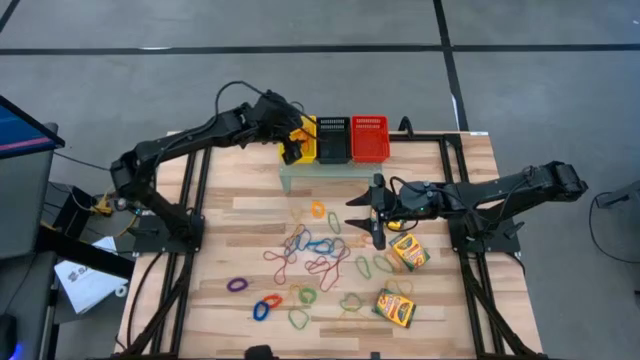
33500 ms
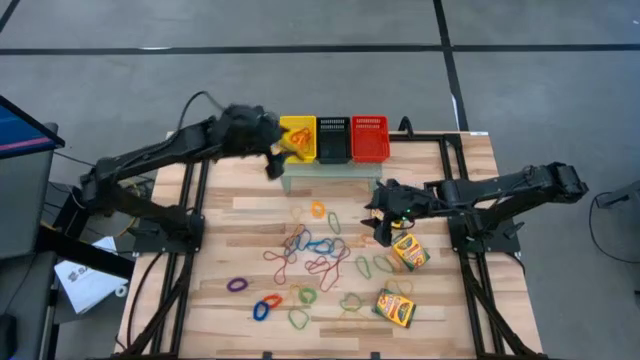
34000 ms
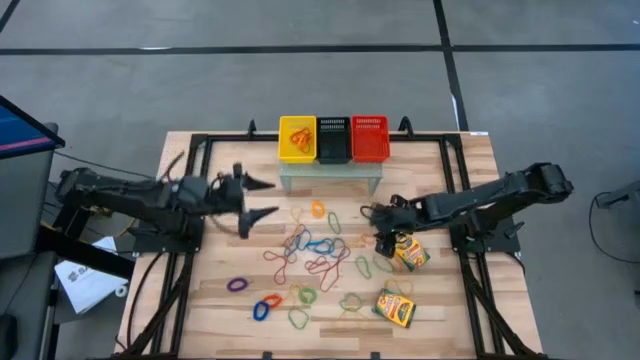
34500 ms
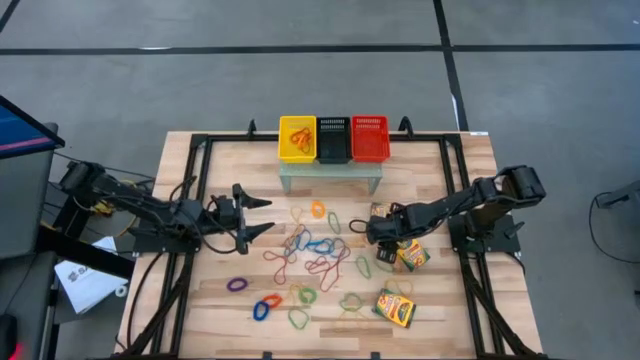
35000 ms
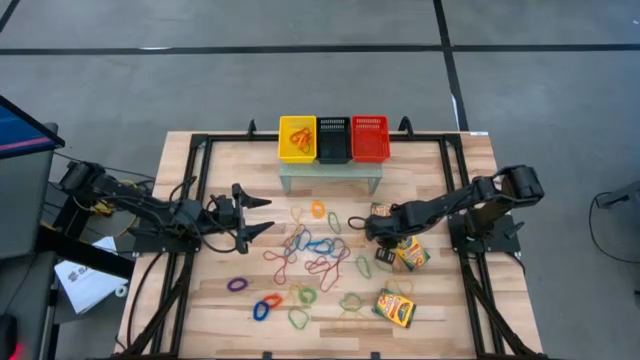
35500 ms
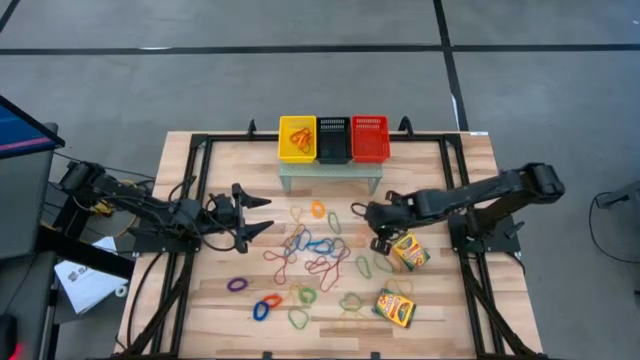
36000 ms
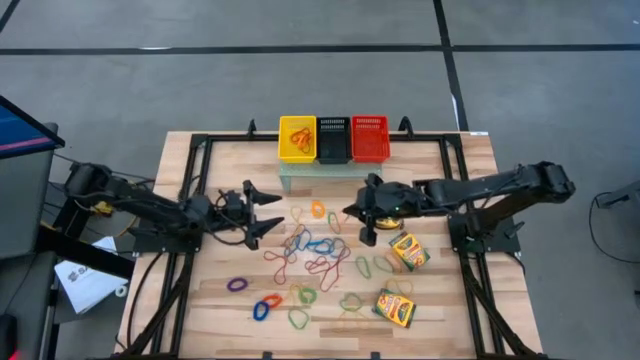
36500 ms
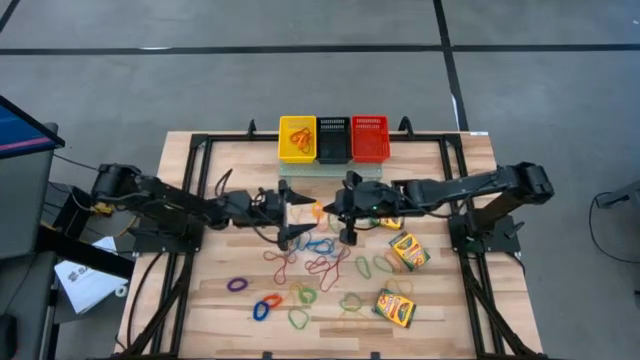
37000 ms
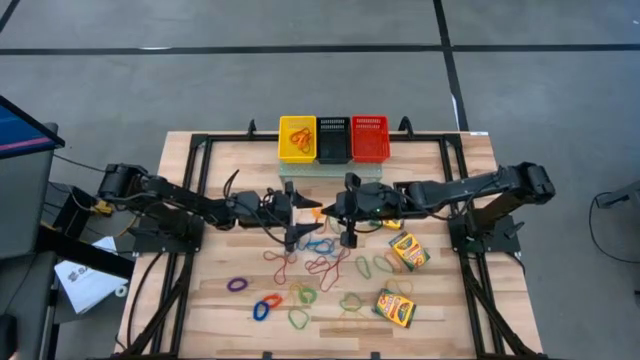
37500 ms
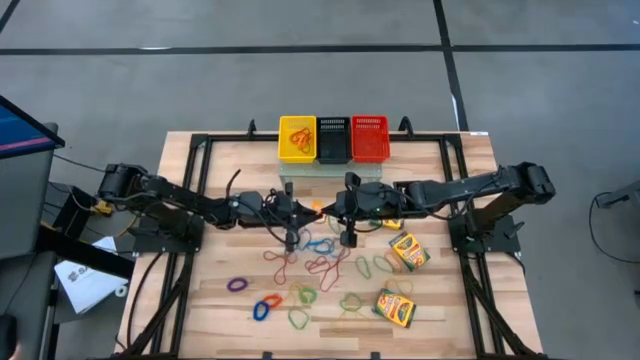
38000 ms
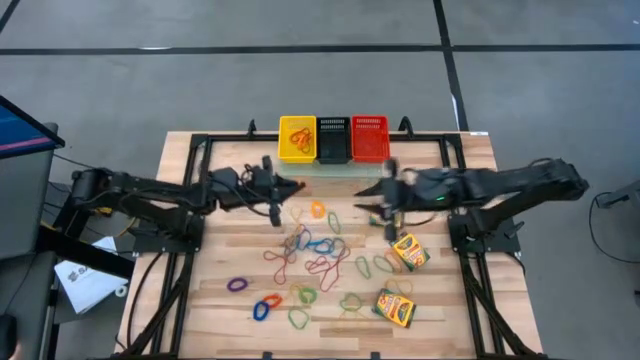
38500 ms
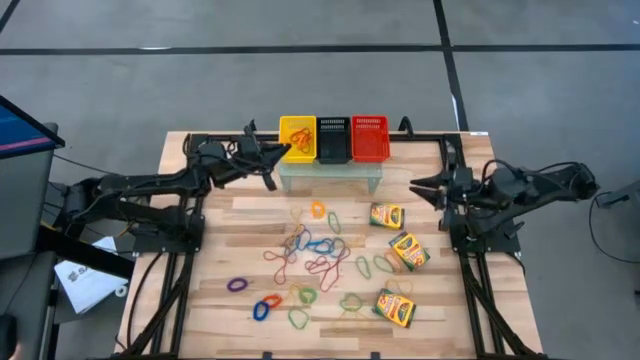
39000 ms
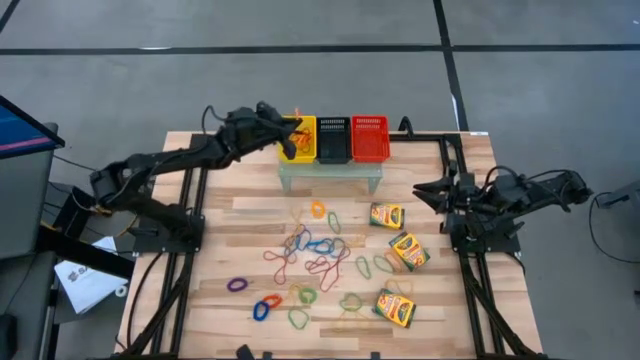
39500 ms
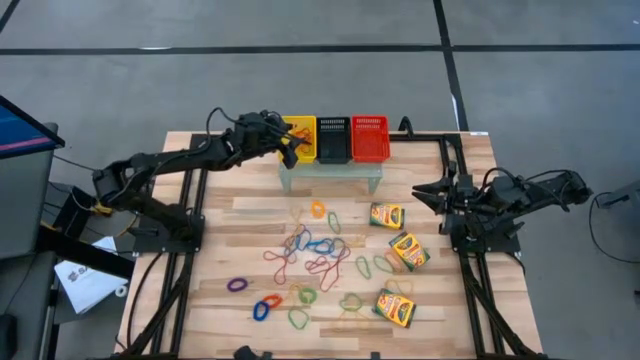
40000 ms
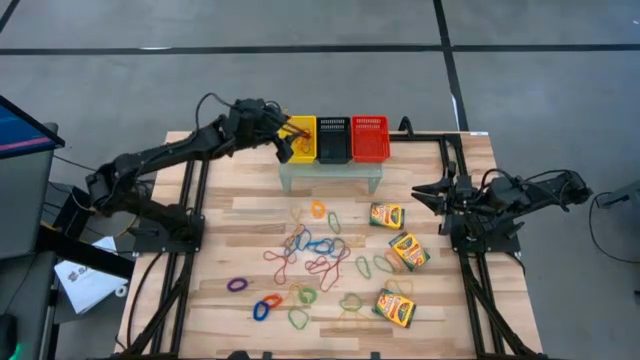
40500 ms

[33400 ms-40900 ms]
Task: Pick & Place Office Desk Supplies
Put the top small orange rubber band into the yellow bin on the shelf

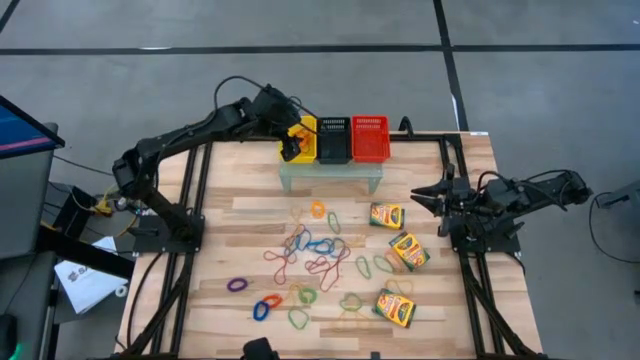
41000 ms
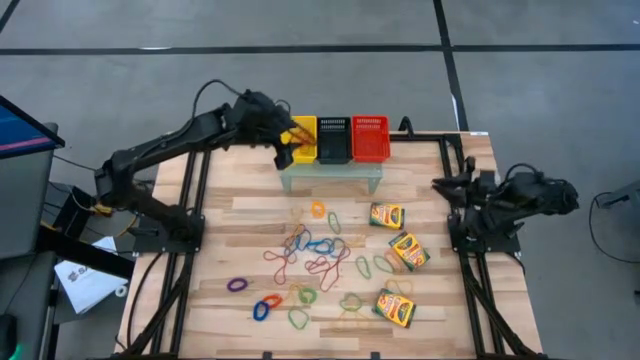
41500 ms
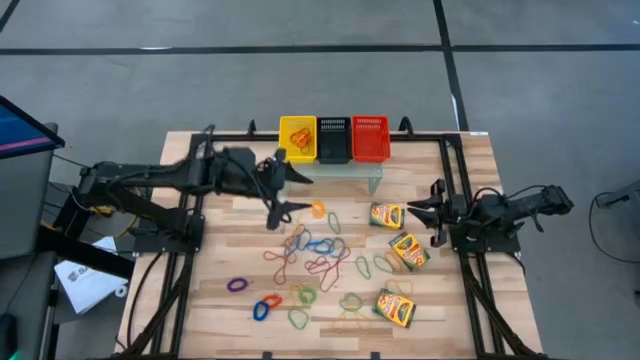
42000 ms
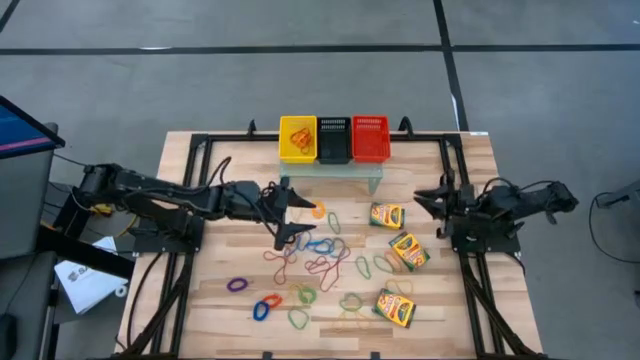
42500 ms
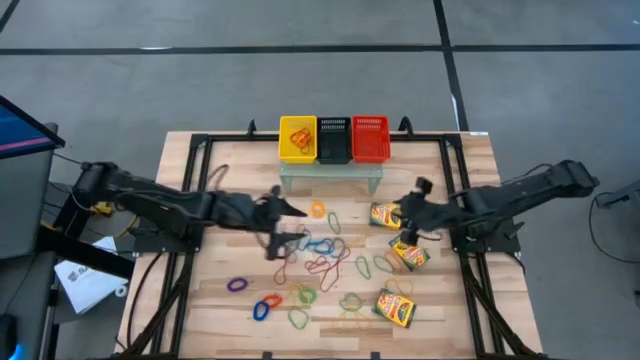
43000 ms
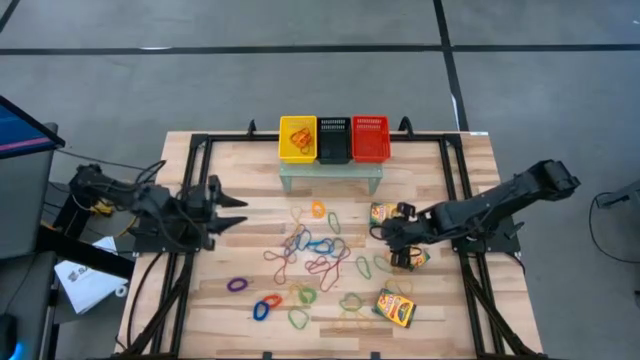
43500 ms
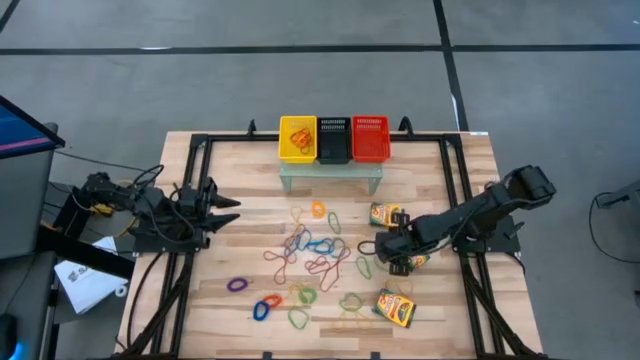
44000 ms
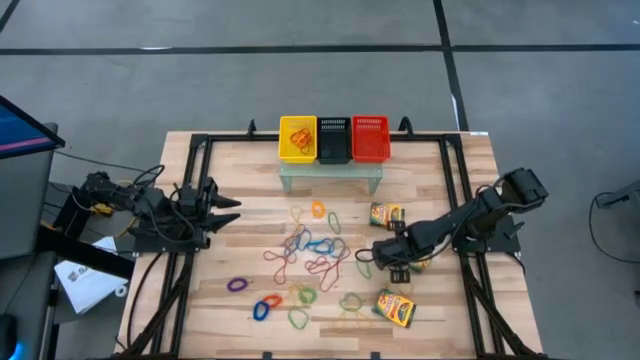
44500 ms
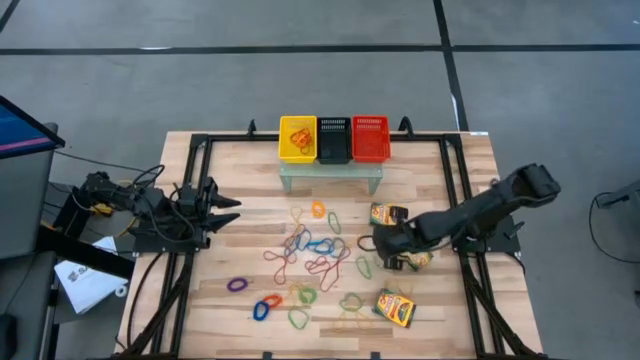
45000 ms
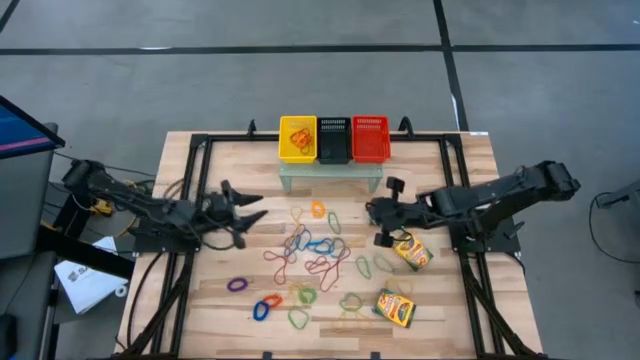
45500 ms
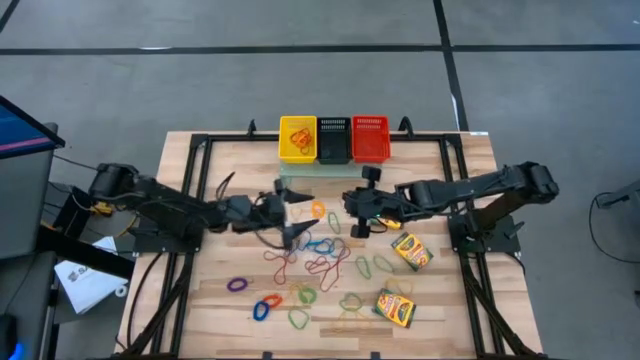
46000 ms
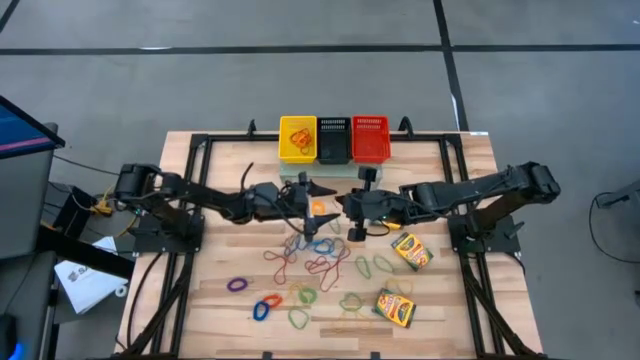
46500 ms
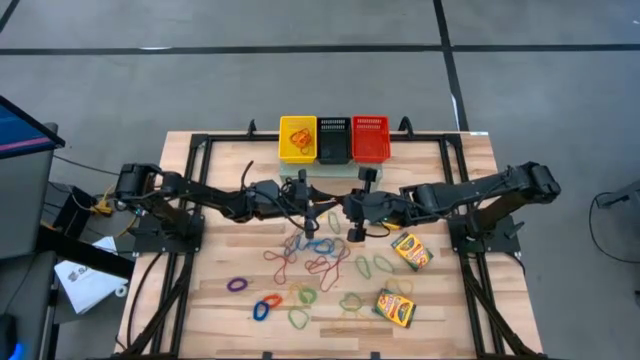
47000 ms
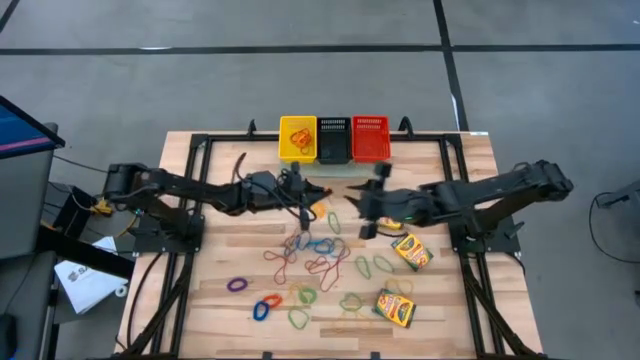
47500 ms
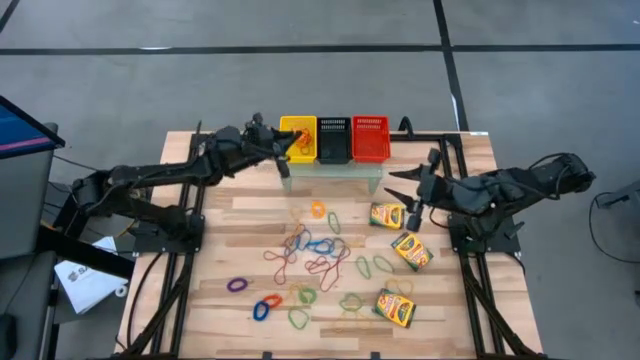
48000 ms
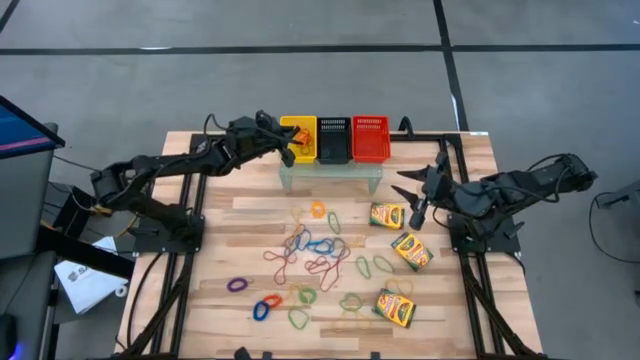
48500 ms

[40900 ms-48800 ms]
Put the small orange rubber band into the yellow bin on the shelf

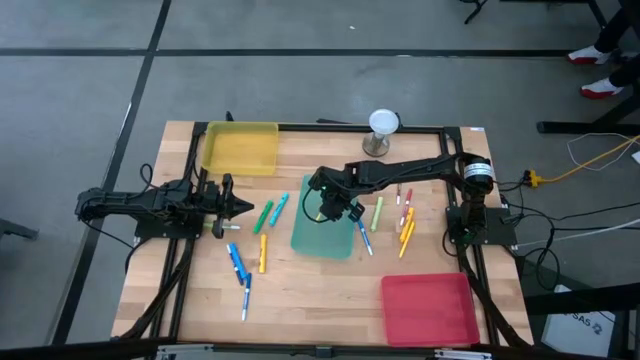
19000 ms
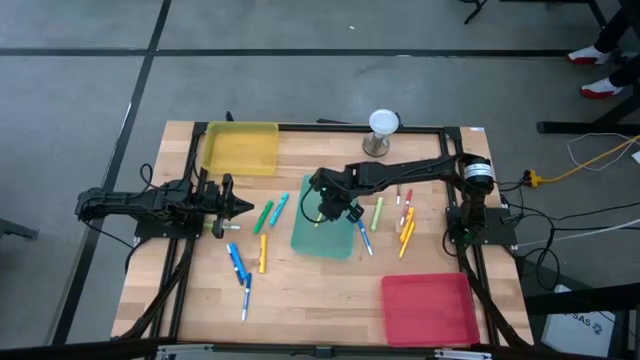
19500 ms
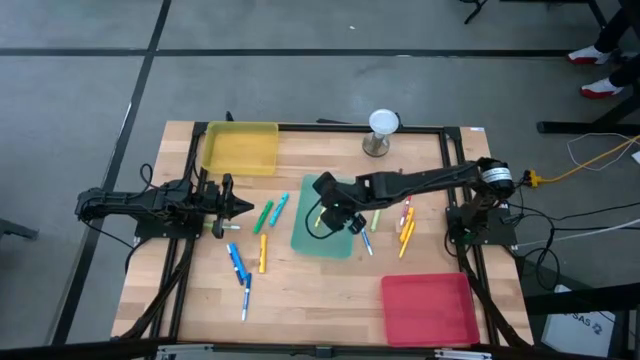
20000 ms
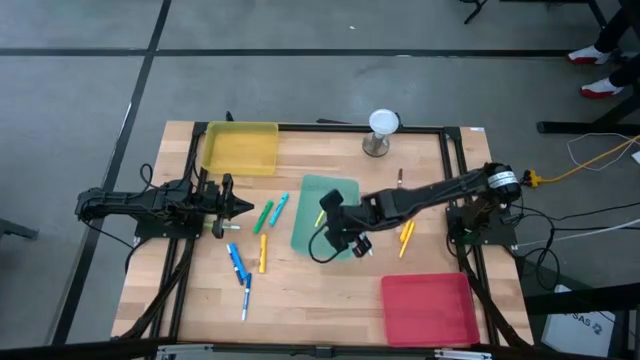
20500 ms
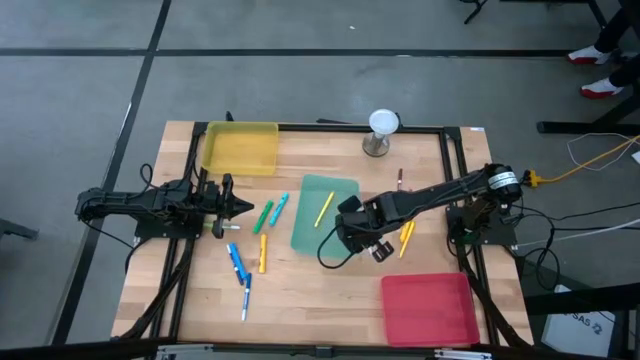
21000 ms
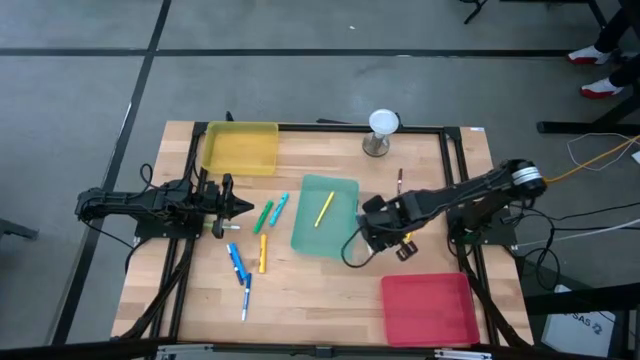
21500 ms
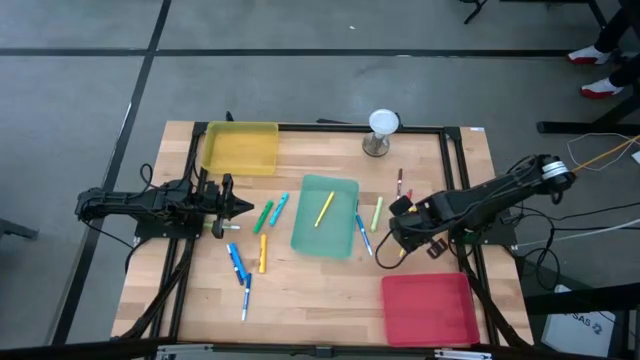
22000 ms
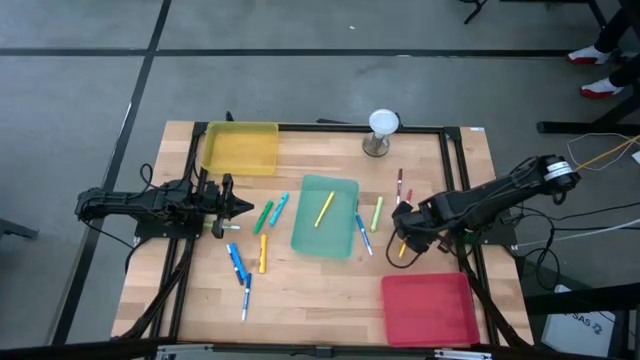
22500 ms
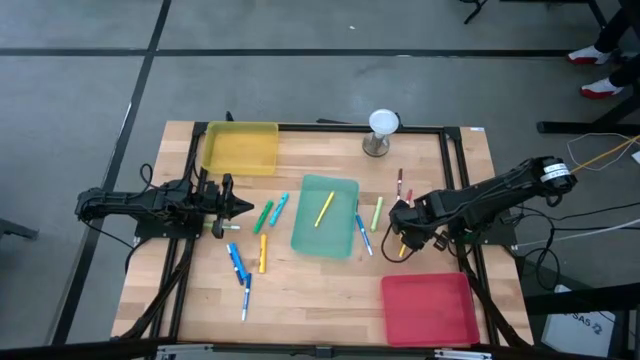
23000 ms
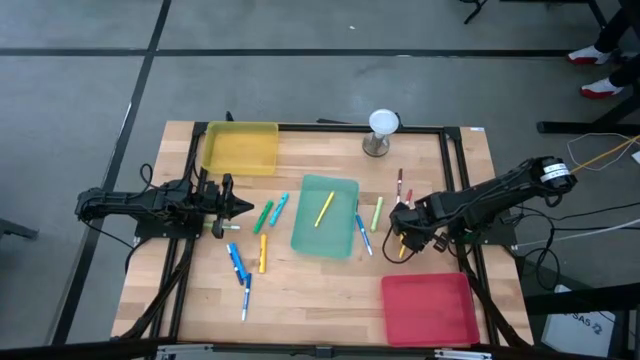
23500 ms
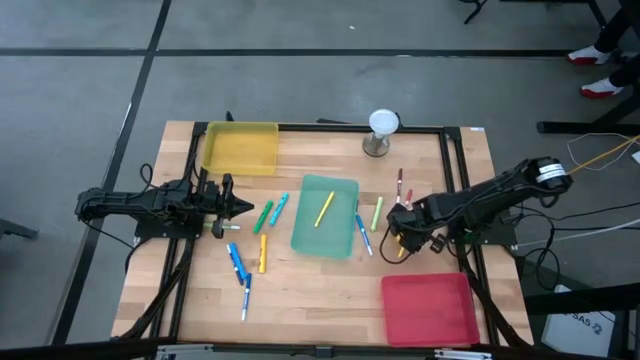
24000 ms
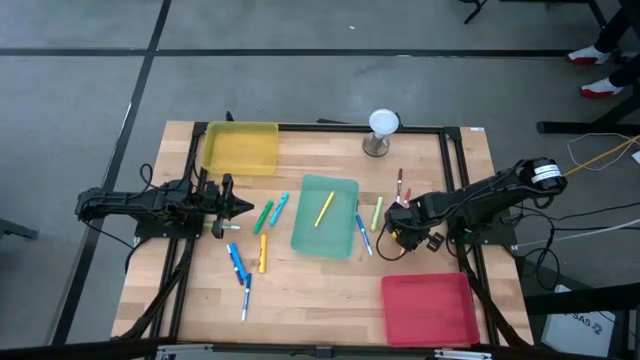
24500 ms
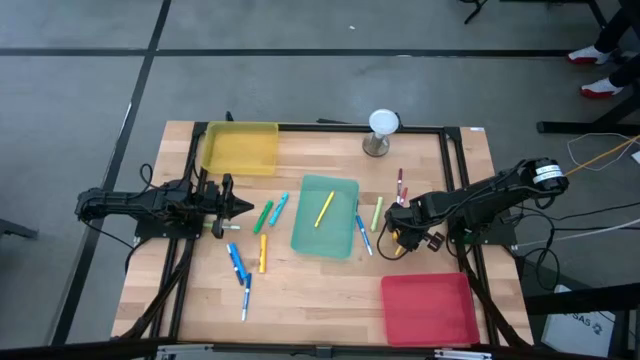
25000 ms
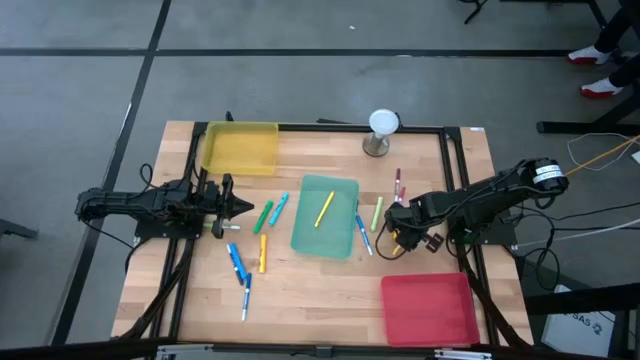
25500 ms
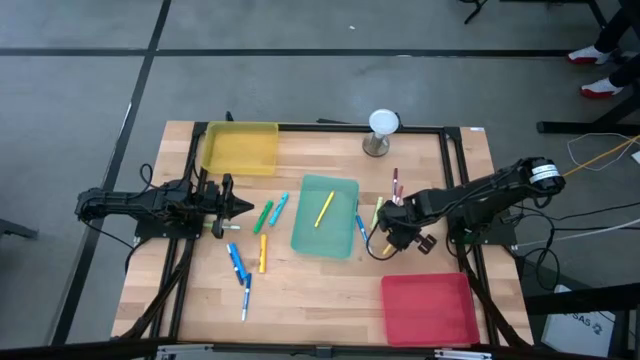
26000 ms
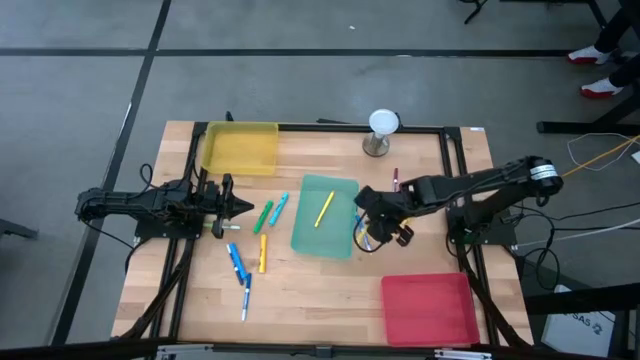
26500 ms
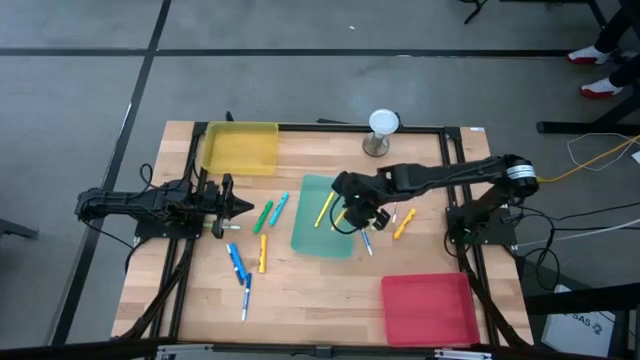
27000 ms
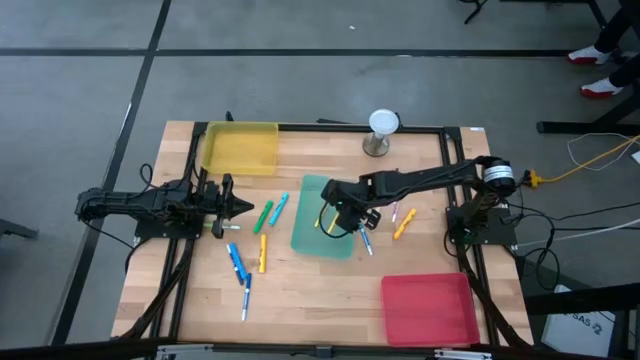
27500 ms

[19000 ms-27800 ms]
Task: Pick & Place Markers
Put the yellow pen into the green bin
